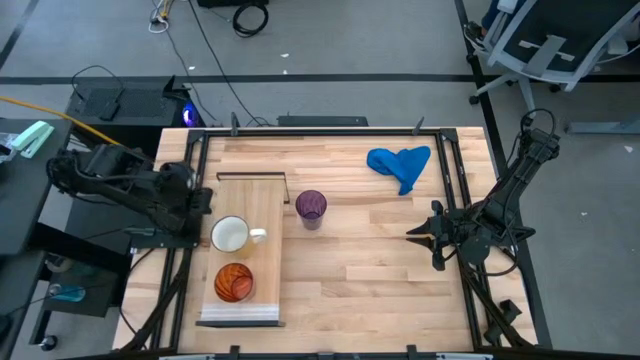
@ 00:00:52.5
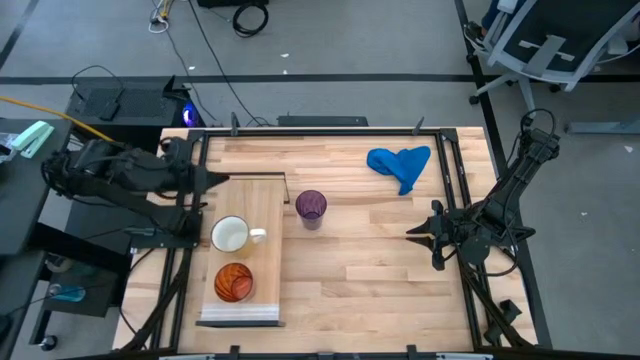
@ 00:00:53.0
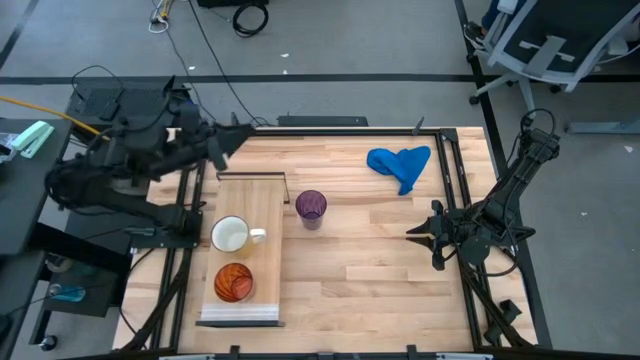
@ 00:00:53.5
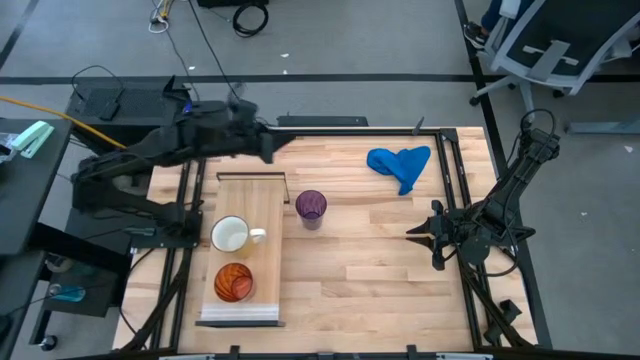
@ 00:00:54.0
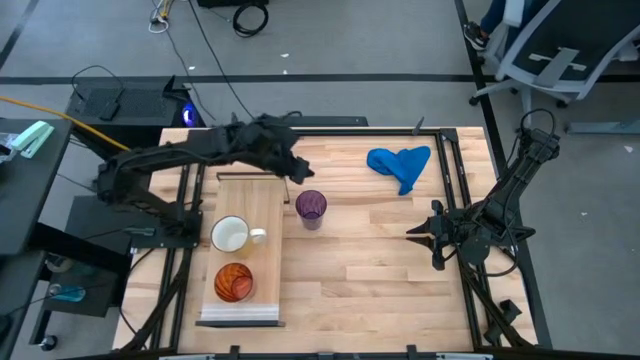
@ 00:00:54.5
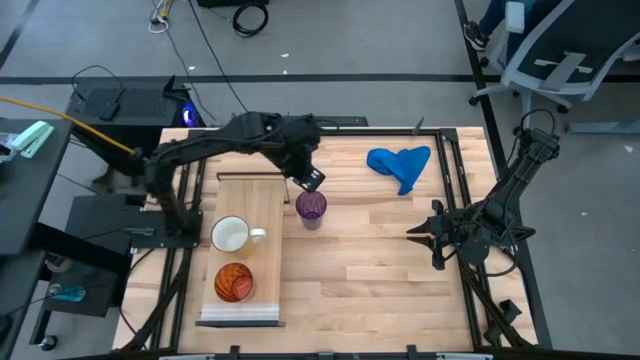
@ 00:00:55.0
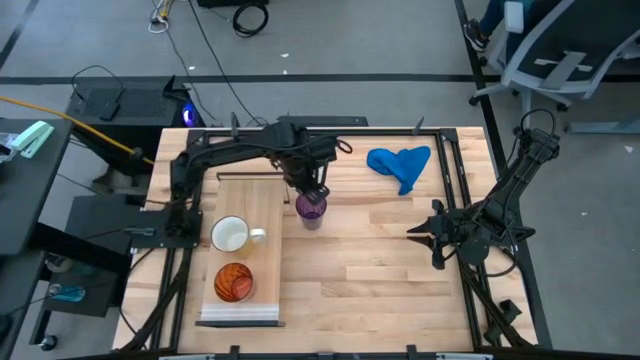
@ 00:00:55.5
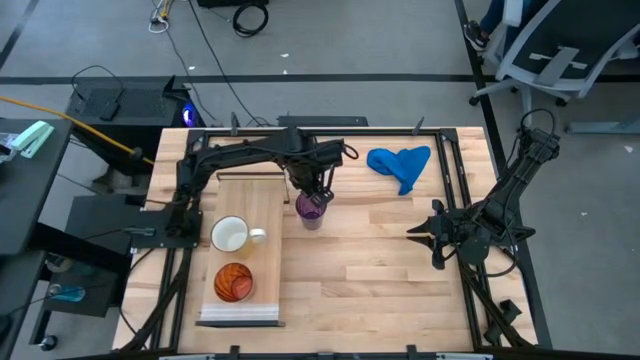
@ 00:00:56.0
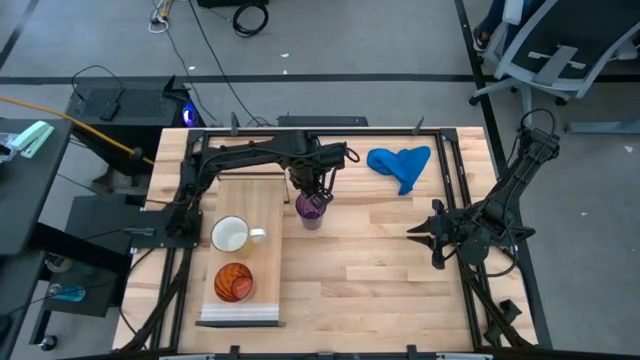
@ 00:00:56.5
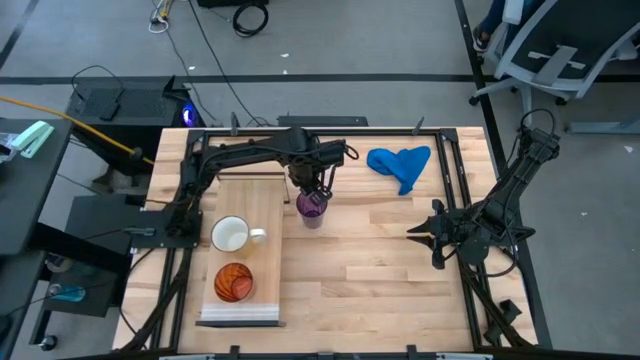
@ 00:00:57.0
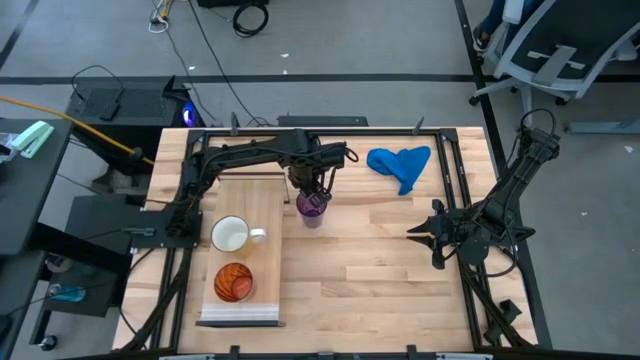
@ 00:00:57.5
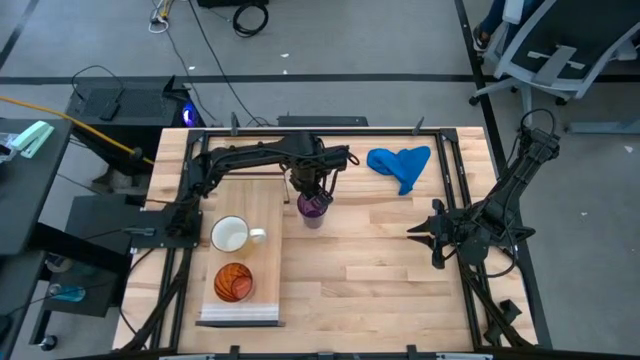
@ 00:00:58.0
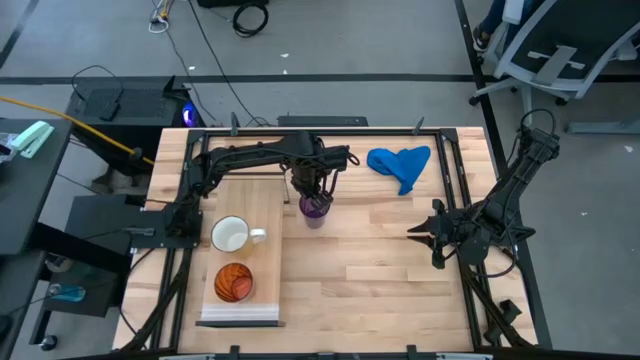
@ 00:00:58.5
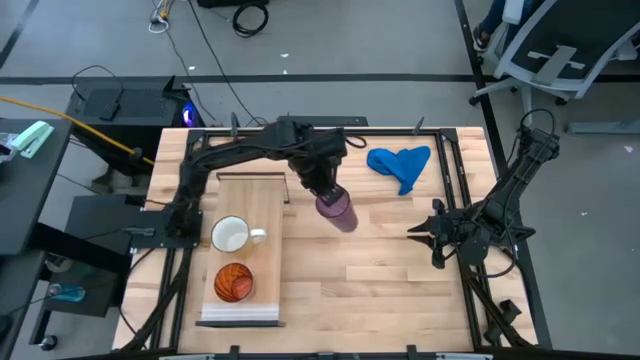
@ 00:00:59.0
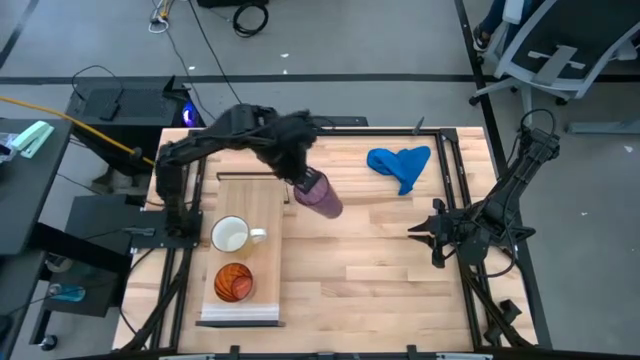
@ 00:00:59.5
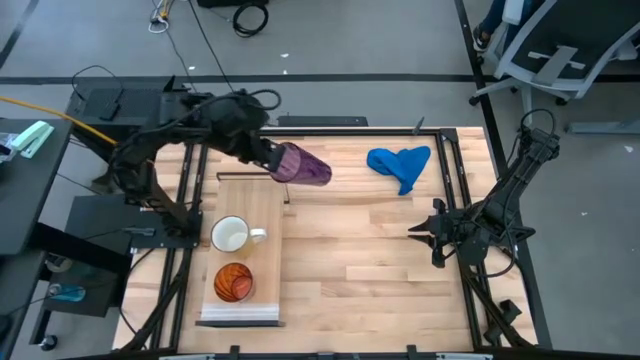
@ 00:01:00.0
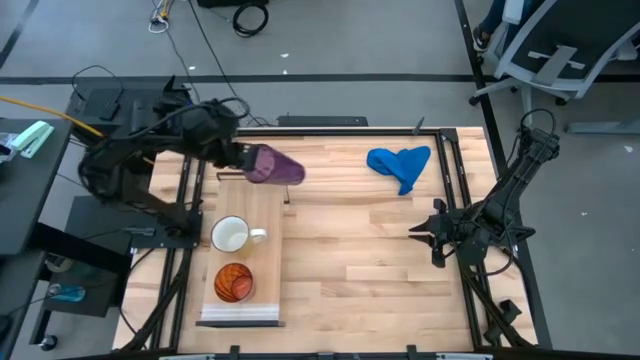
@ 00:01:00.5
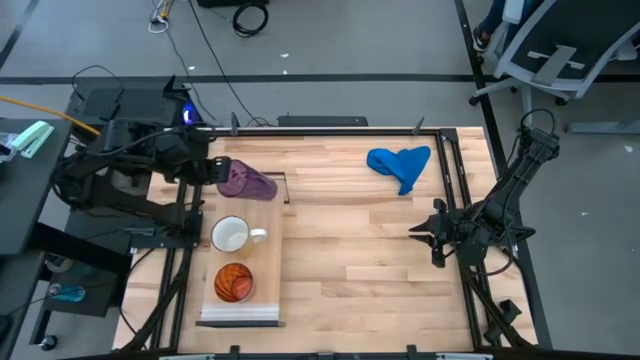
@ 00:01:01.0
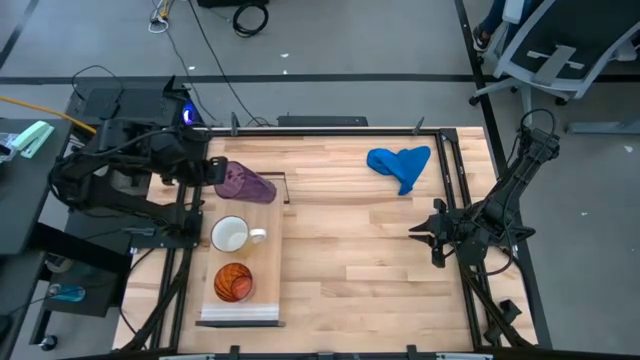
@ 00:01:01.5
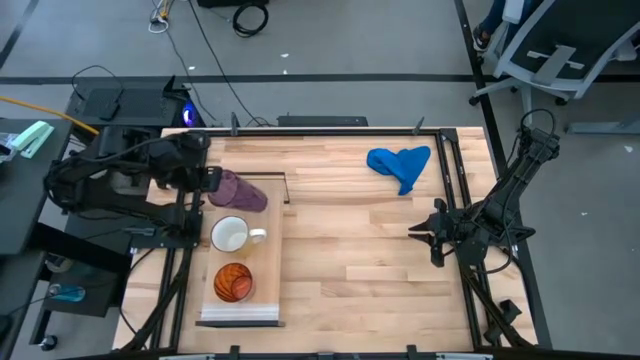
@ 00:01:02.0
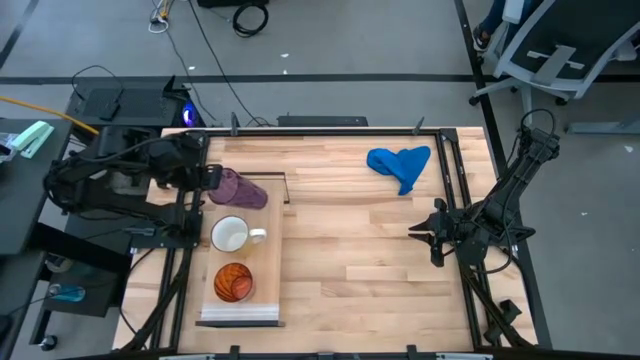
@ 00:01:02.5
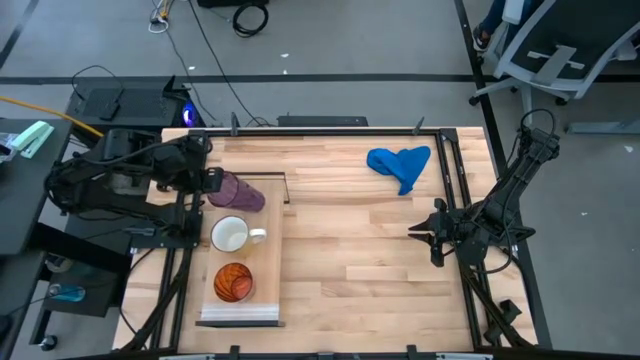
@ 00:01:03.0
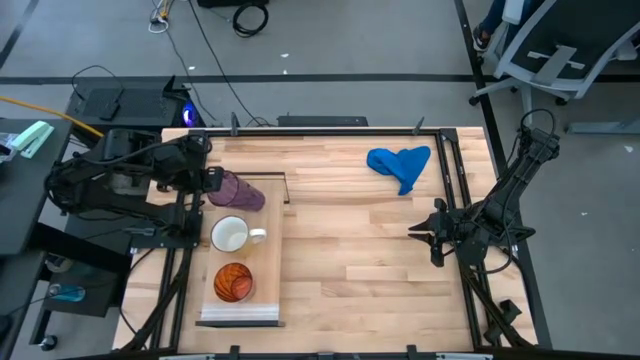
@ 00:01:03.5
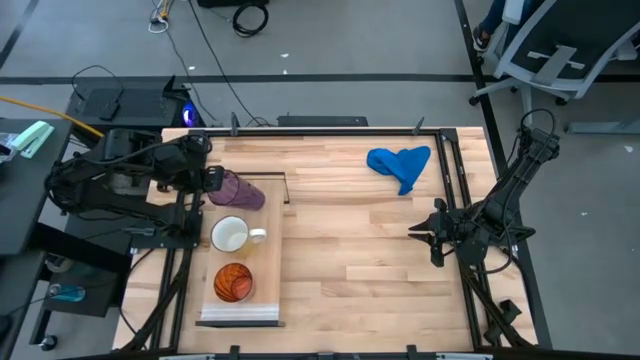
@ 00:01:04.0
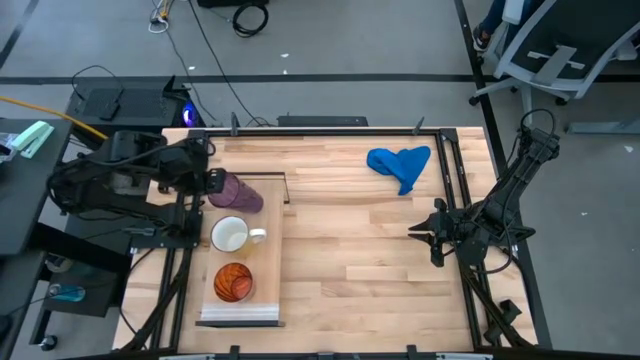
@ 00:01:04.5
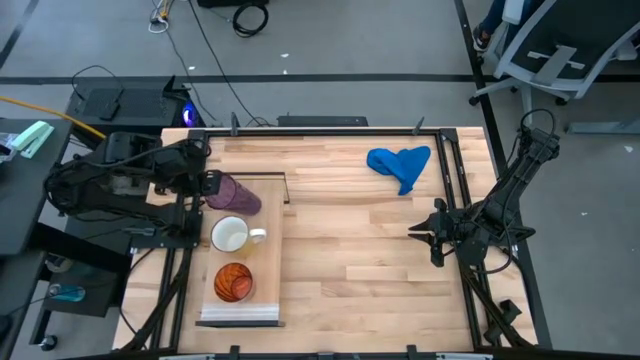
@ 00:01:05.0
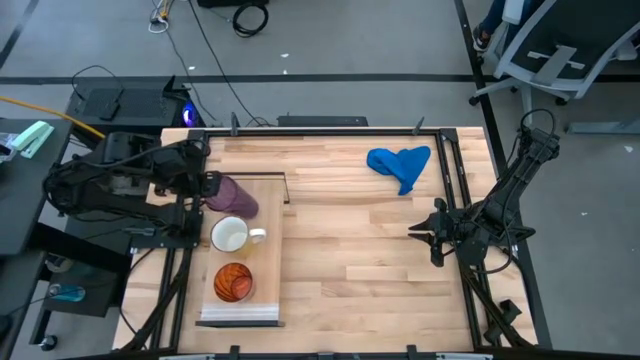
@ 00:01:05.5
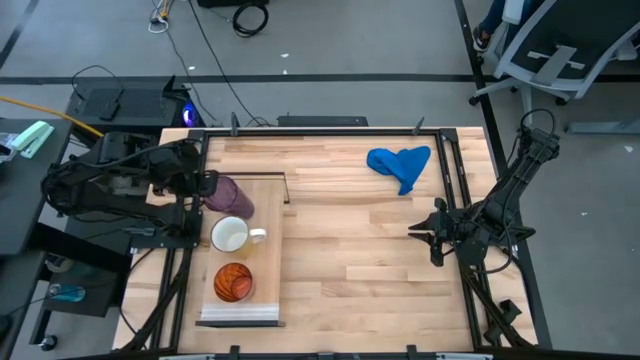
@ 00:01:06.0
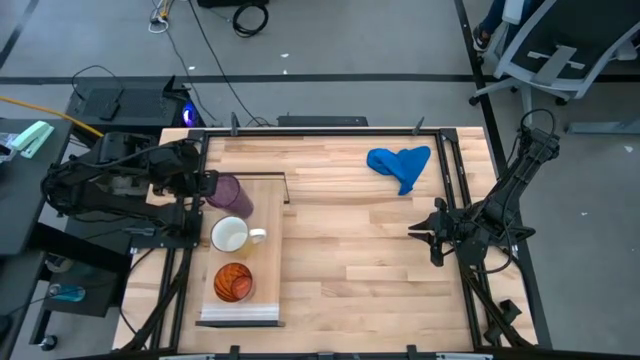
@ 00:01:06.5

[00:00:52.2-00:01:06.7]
Task: Stack small to large cups/mugs on shelf
Put the purple cup on the shelf

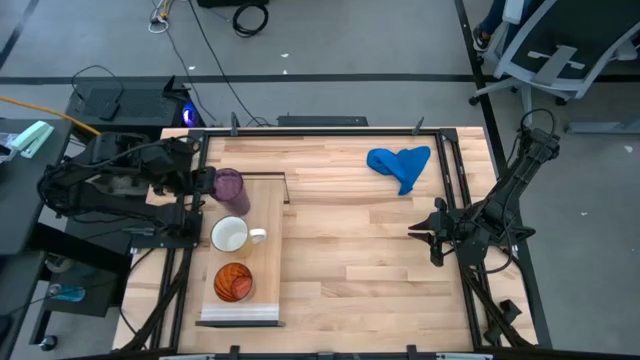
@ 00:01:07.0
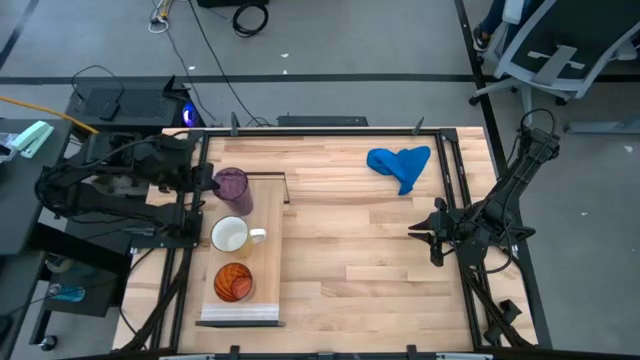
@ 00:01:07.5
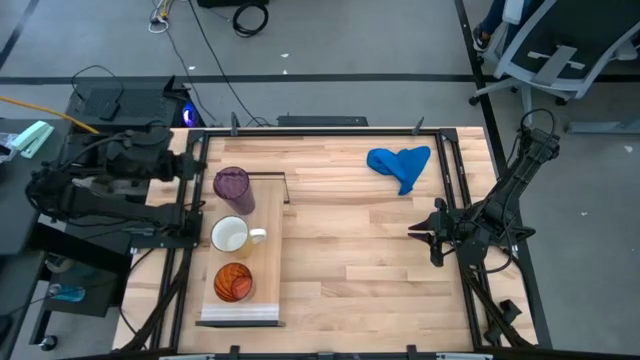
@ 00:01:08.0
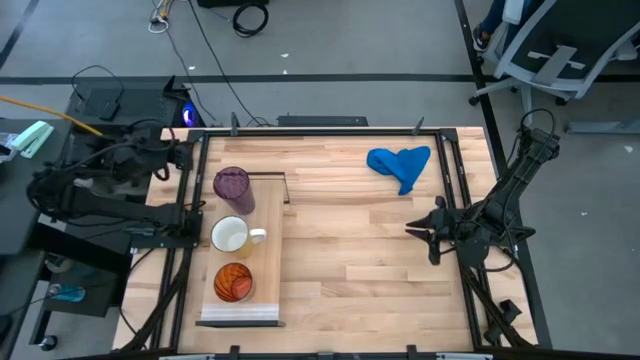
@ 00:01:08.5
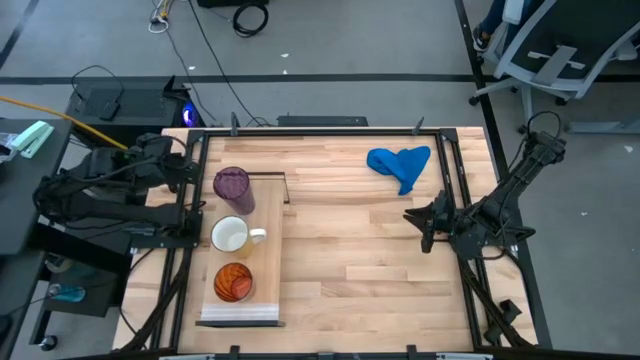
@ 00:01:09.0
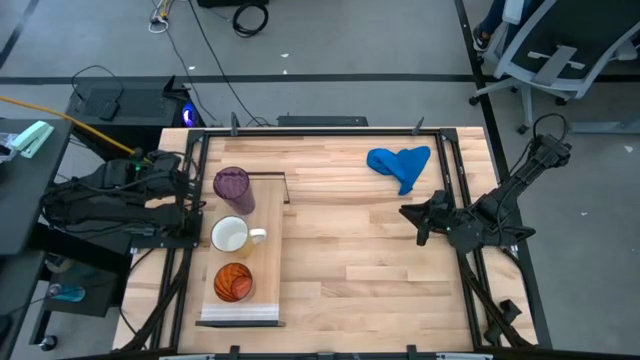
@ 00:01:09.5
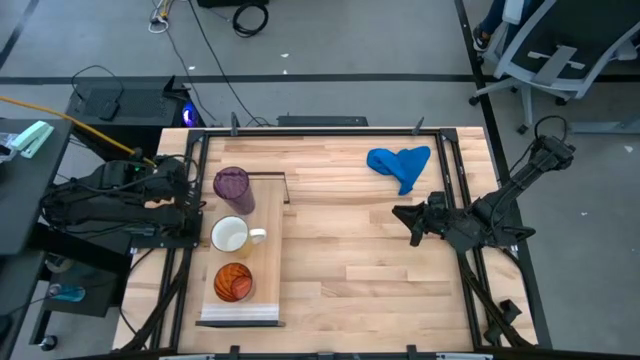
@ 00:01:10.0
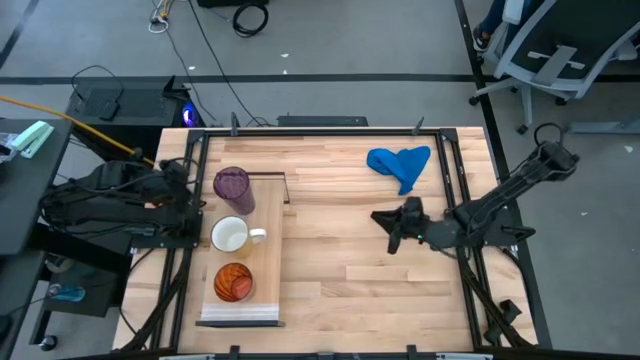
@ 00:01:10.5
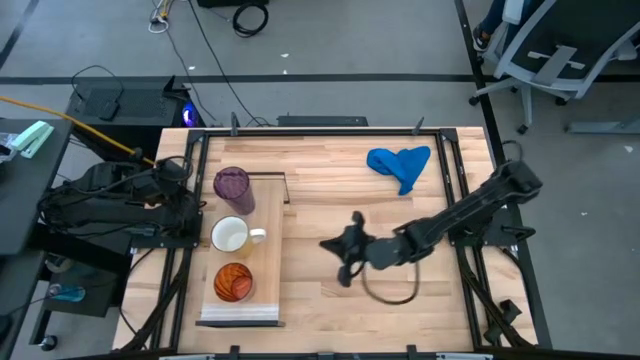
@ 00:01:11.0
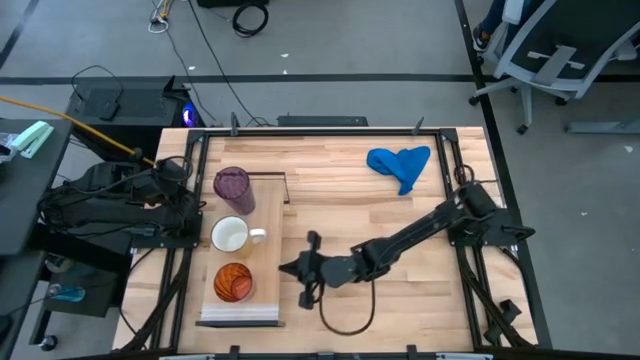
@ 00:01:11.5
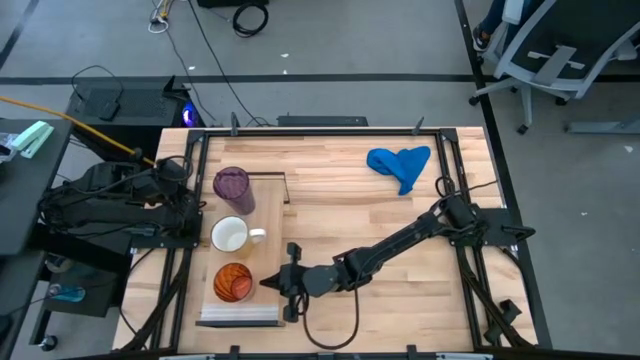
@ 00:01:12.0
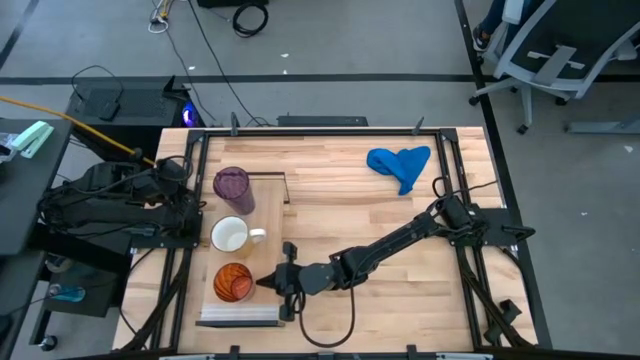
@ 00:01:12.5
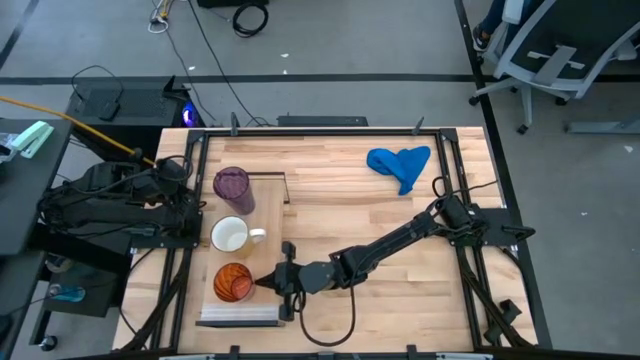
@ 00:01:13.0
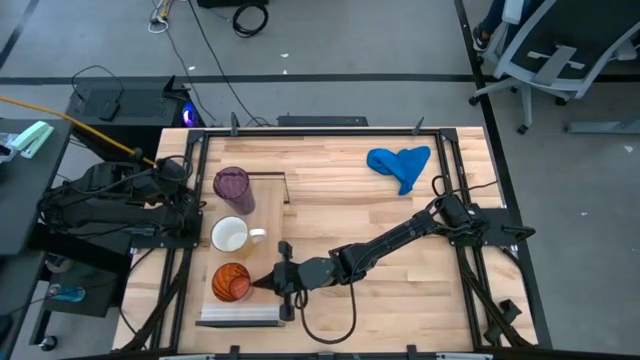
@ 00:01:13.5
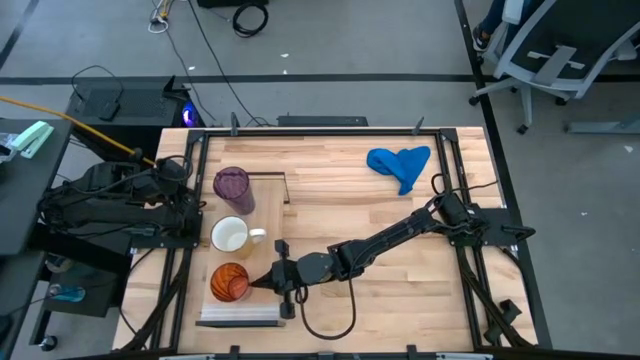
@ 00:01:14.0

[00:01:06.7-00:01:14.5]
Adjust the orange cup on the shelf
